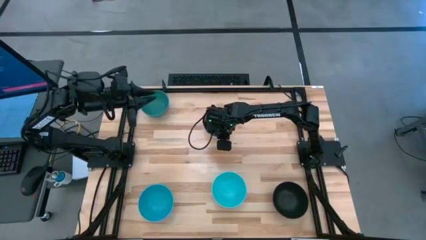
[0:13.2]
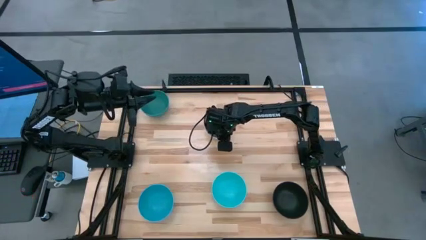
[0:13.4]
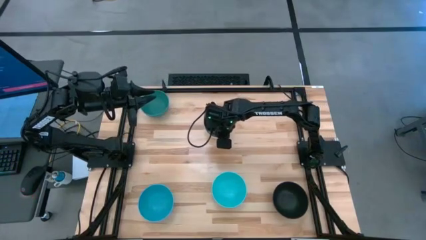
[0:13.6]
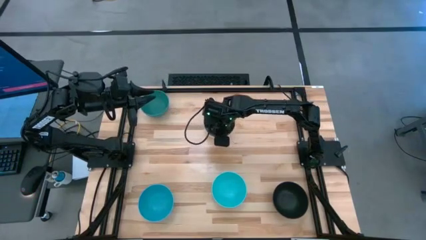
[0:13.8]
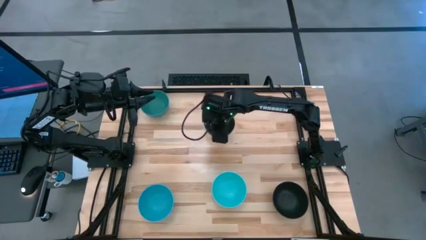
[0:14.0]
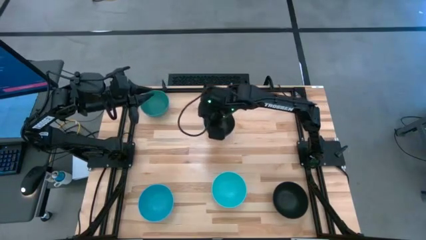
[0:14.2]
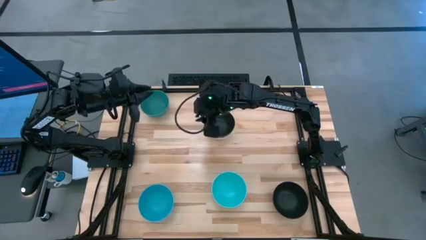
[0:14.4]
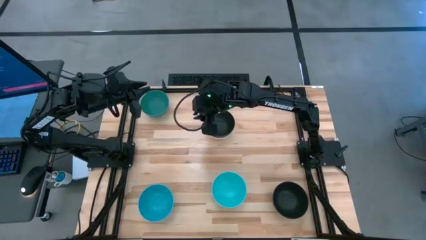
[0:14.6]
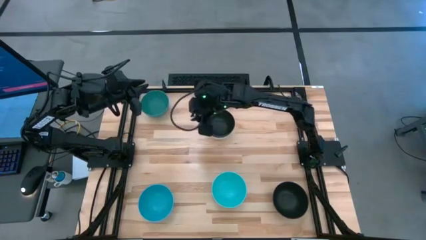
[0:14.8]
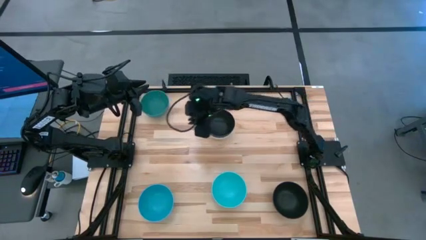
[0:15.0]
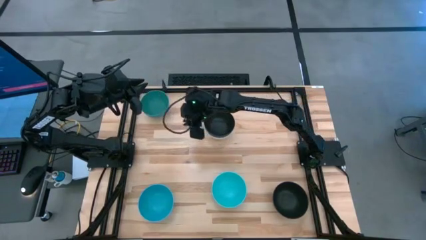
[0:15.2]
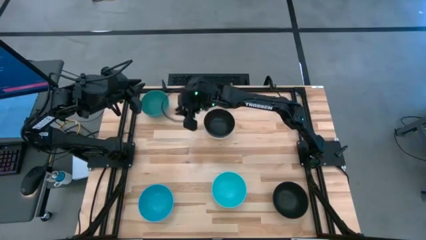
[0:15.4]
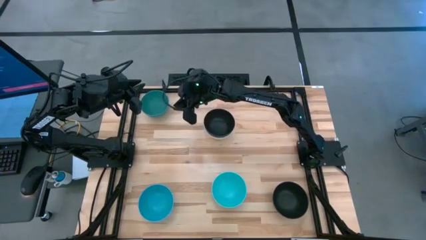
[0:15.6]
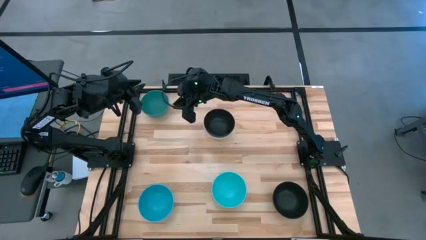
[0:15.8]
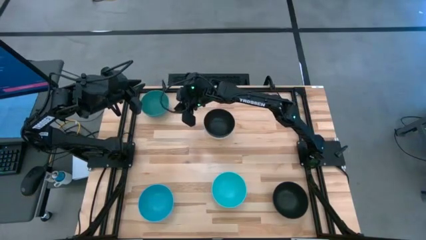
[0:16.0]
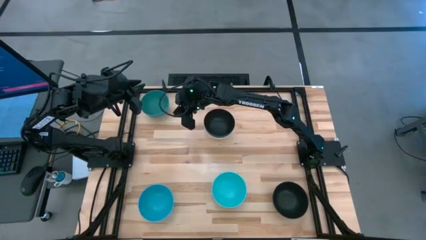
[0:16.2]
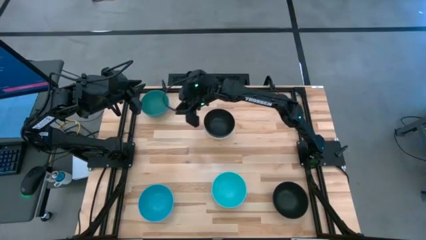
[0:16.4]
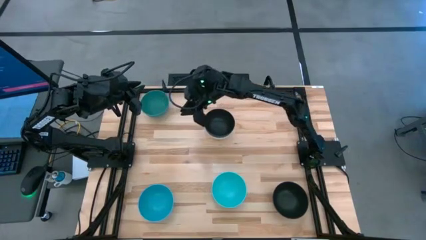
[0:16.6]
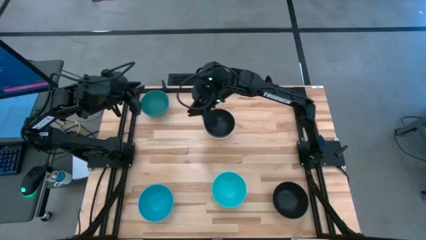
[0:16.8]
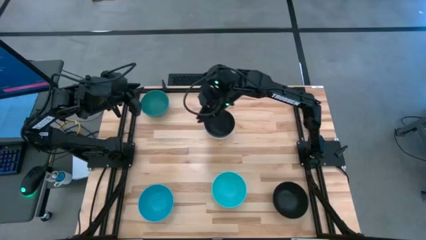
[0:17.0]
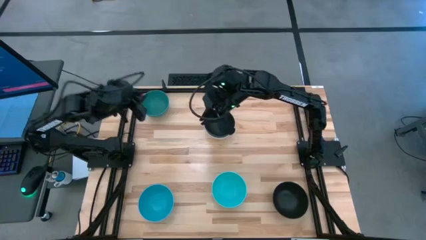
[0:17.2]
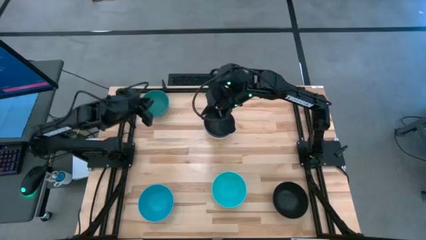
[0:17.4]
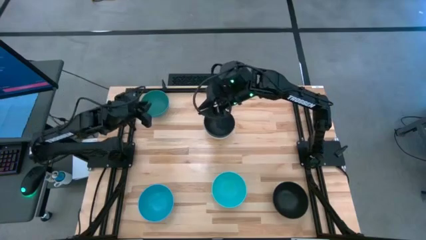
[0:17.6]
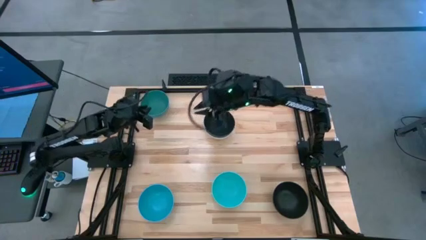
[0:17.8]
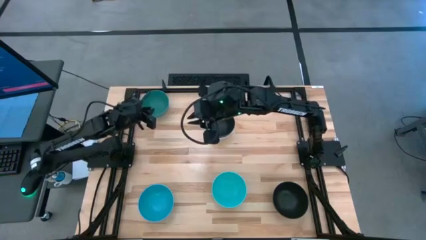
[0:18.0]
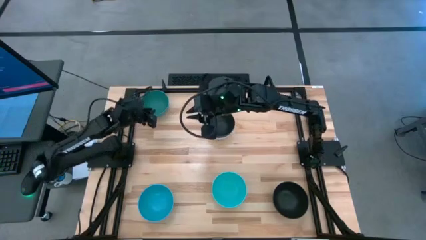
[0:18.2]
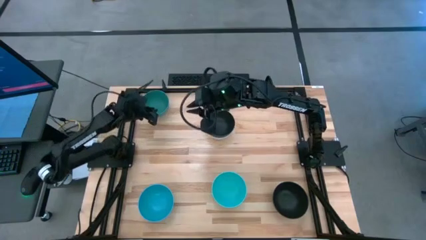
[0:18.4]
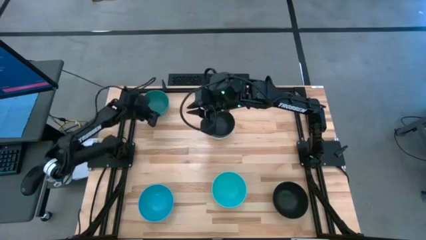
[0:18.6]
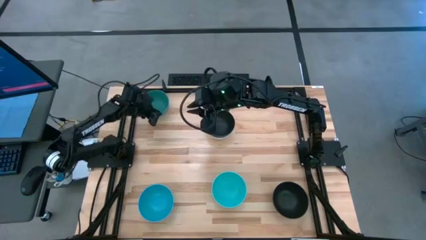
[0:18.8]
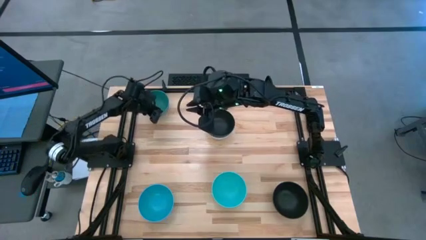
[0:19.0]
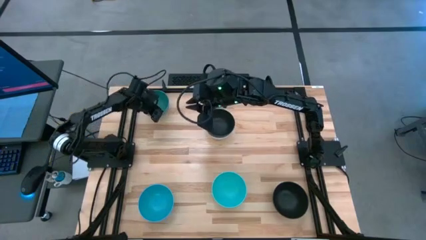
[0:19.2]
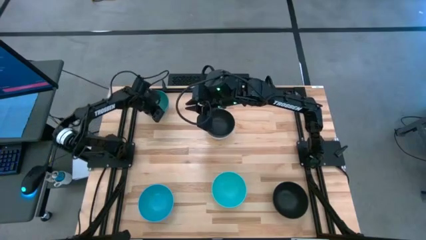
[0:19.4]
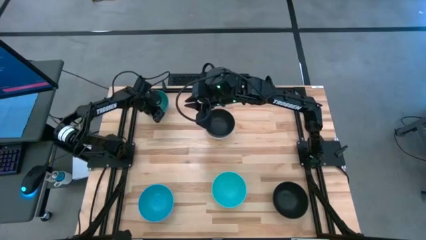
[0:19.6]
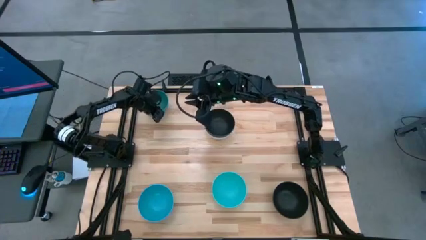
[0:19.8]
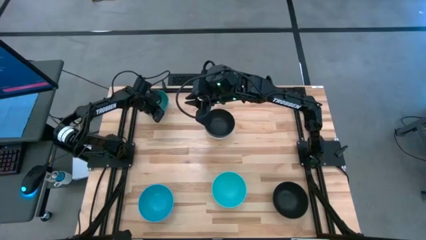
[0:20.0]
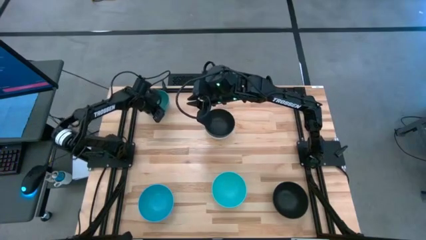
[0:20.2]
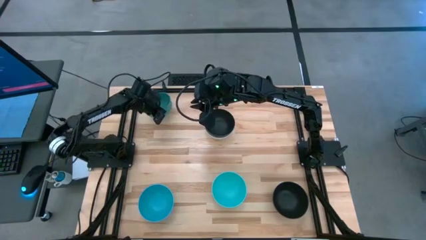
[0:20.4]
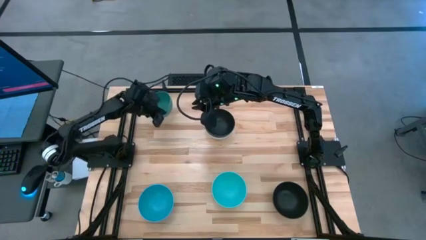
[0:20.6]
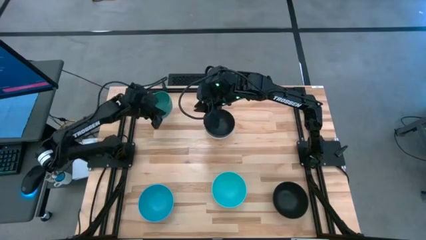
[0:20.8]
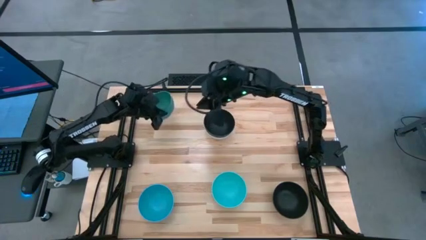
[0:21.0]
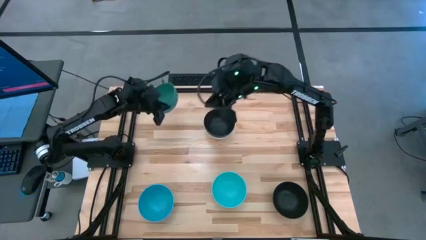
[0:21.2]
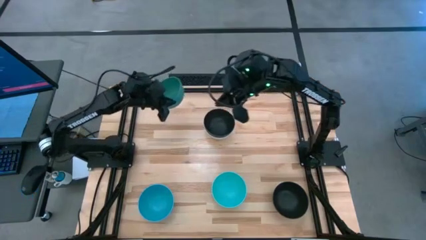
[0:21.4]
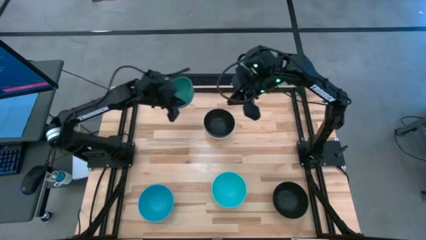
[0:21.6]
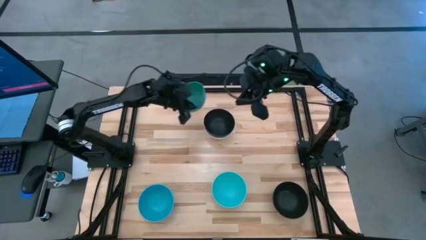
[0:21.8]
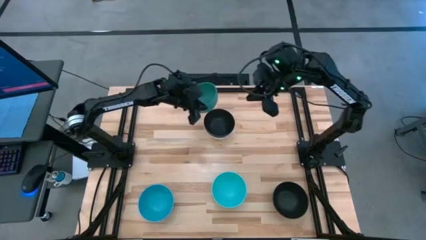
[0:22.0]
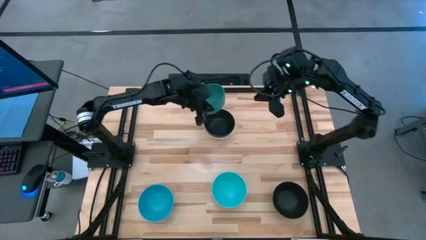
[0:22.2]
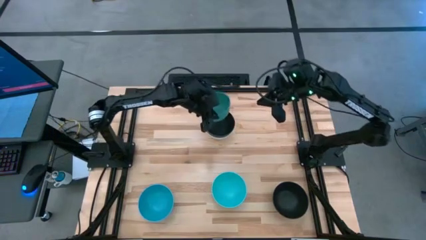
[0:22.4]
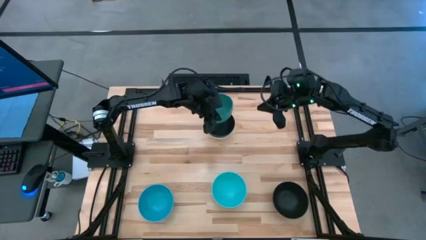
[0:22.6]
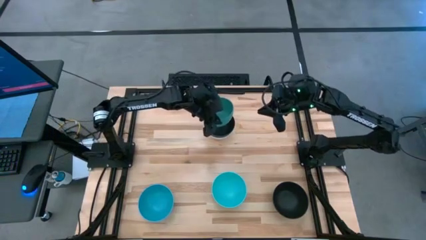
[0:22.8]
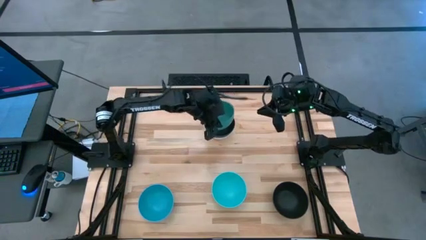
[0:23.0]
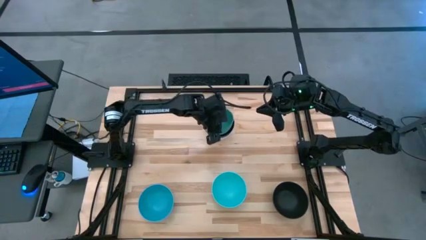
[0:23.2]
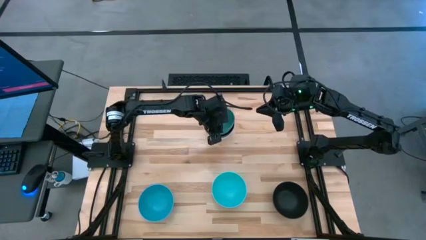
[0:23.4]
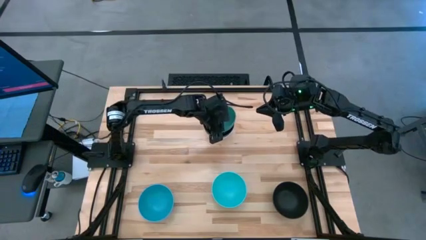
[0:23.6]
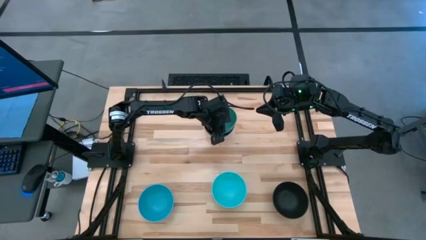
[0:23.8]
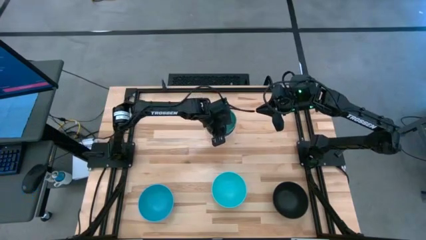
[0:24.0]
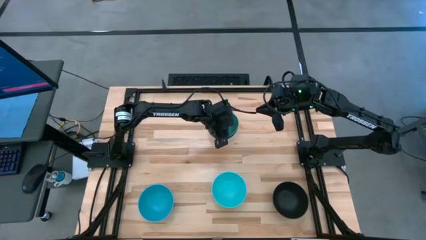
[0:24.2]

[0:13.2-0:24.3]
Task: Nest bowls inside each other
Stack the green bowl on the black bowl
